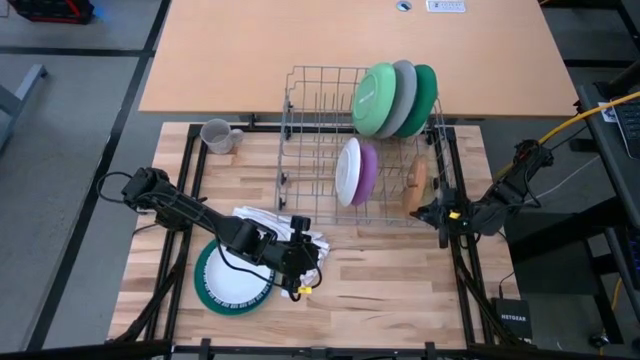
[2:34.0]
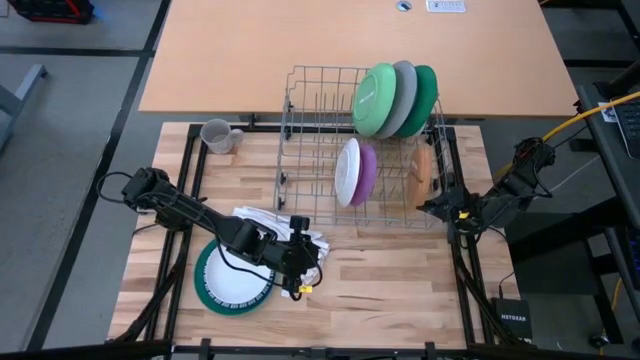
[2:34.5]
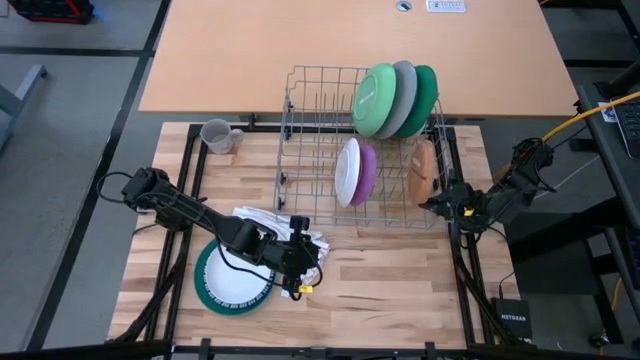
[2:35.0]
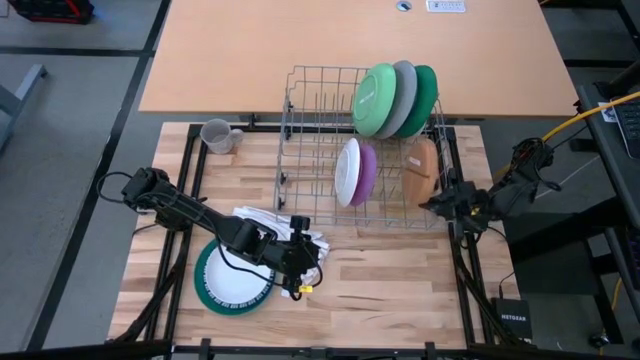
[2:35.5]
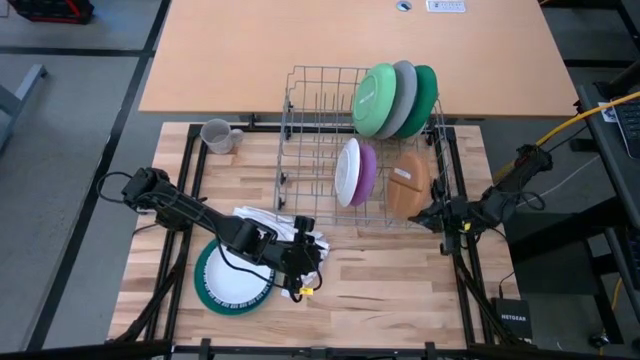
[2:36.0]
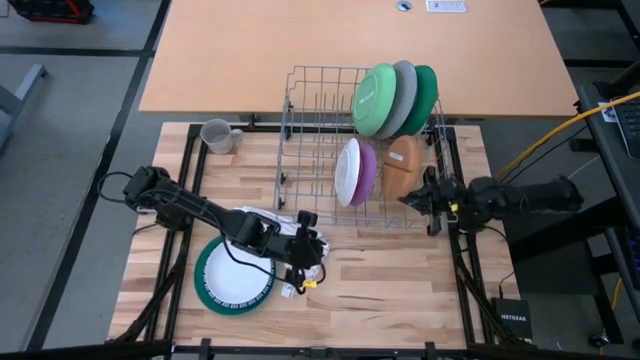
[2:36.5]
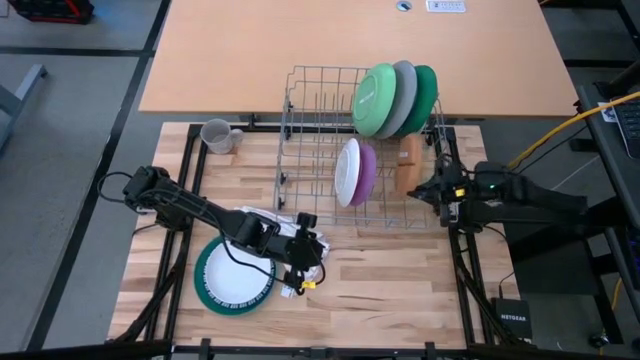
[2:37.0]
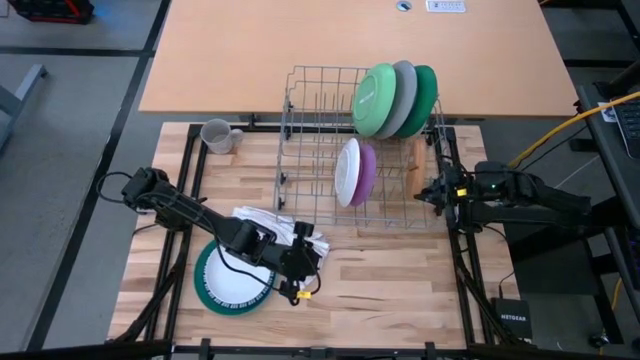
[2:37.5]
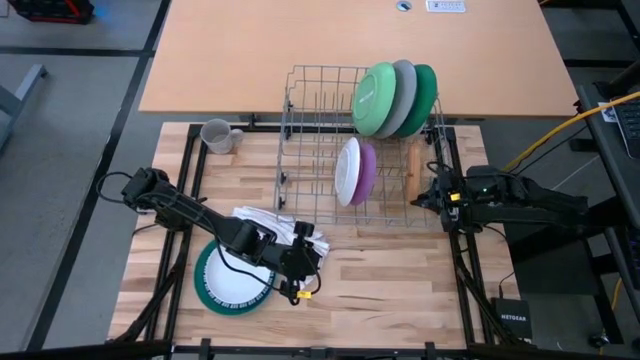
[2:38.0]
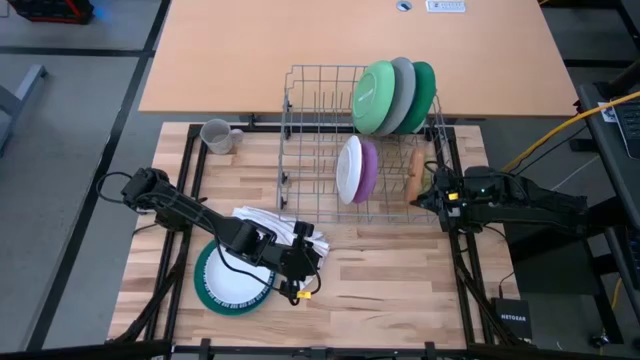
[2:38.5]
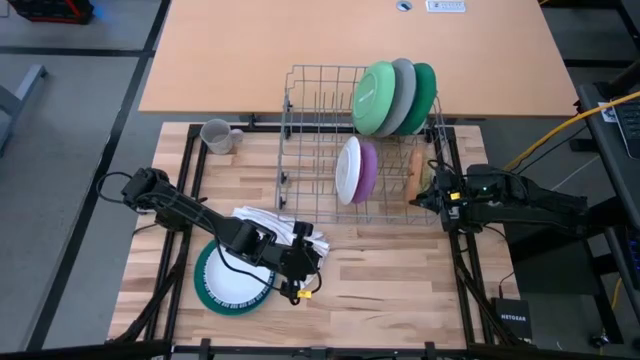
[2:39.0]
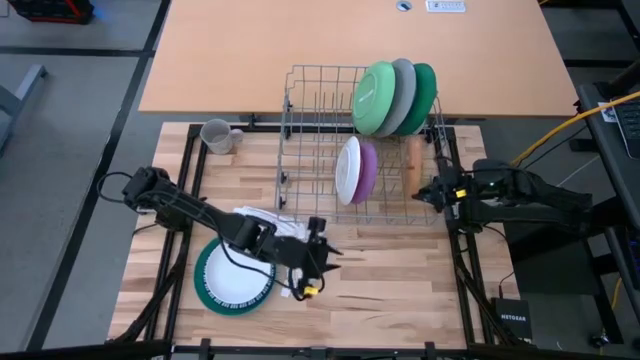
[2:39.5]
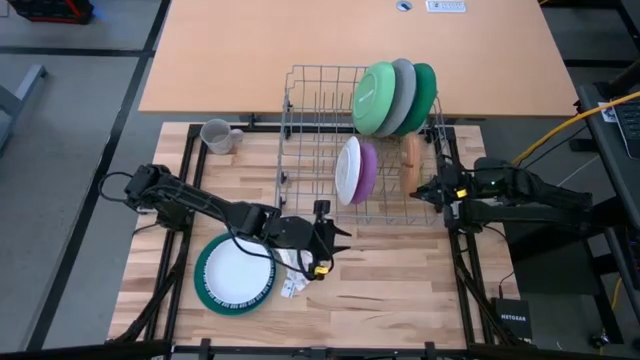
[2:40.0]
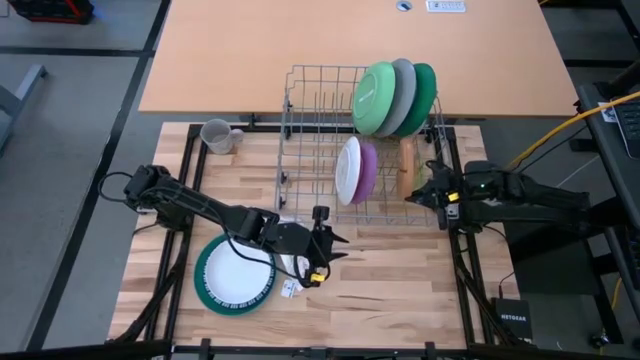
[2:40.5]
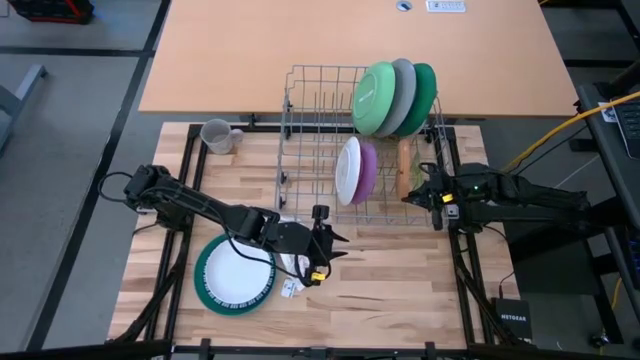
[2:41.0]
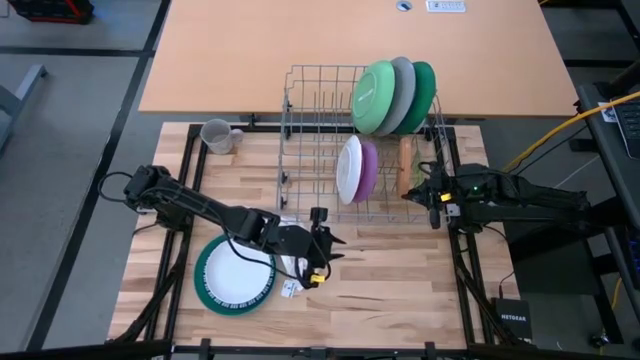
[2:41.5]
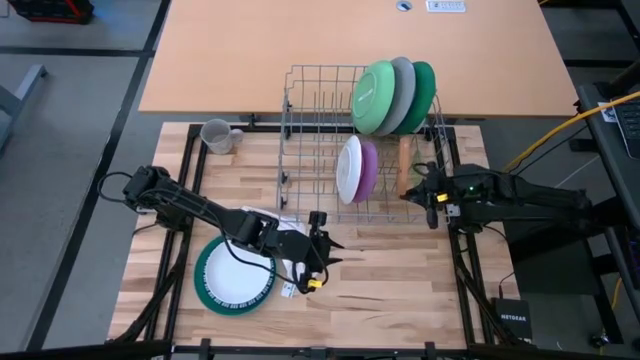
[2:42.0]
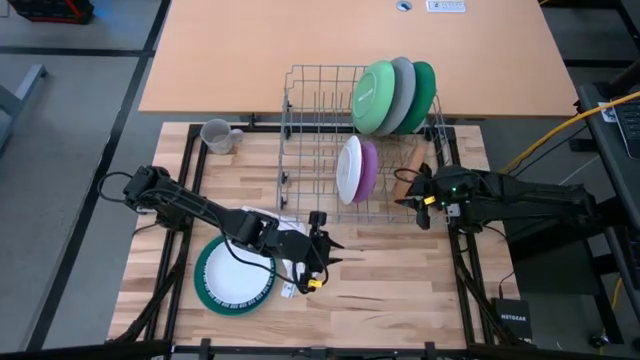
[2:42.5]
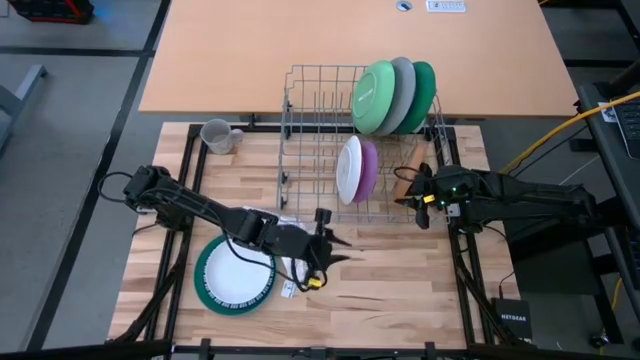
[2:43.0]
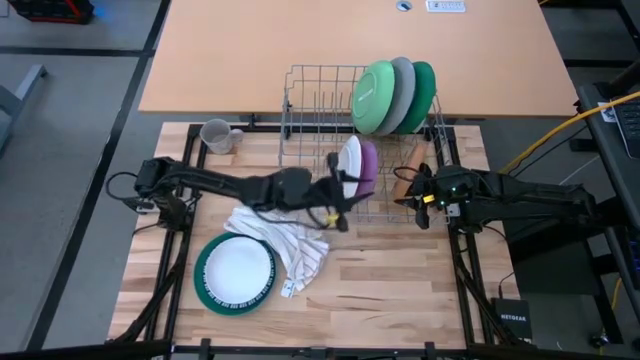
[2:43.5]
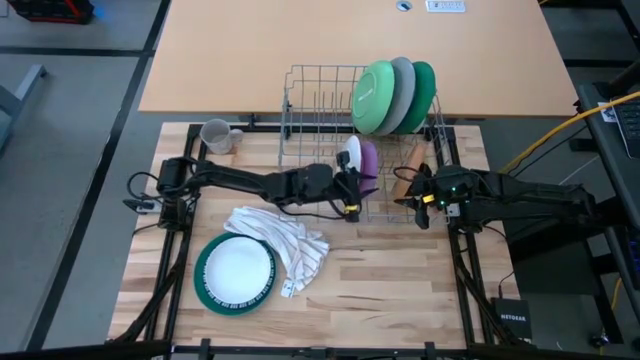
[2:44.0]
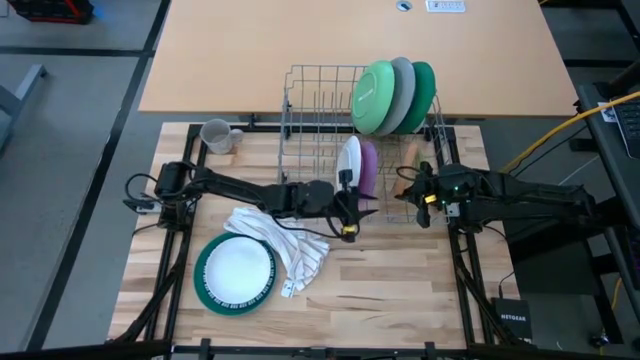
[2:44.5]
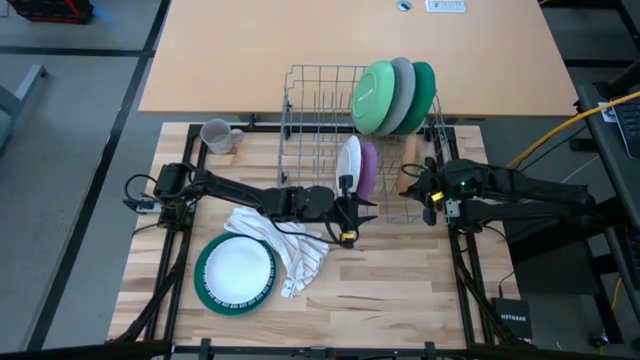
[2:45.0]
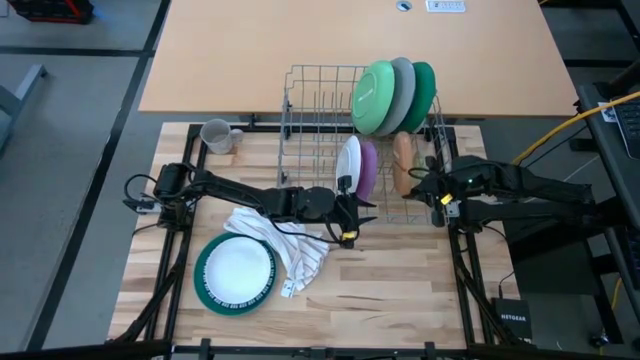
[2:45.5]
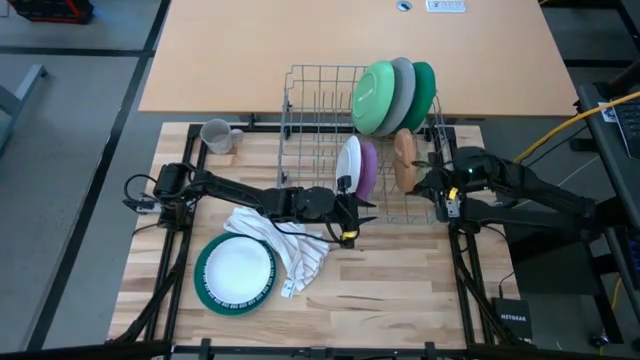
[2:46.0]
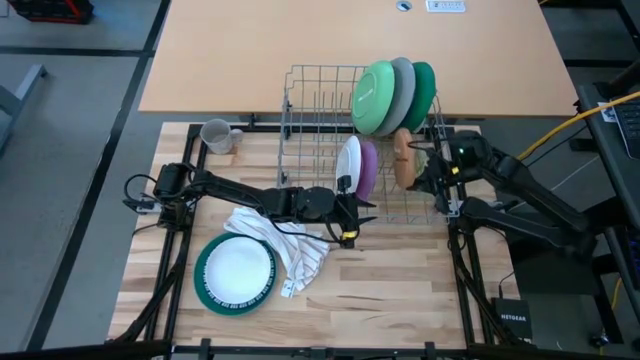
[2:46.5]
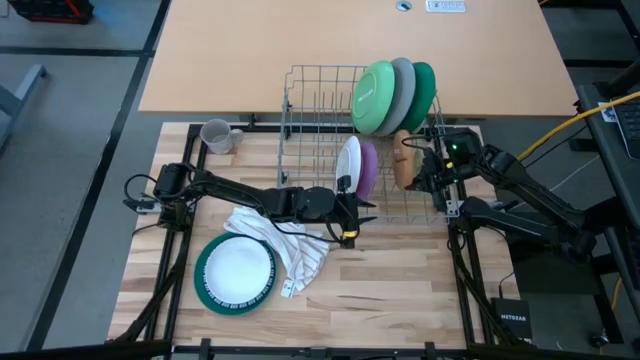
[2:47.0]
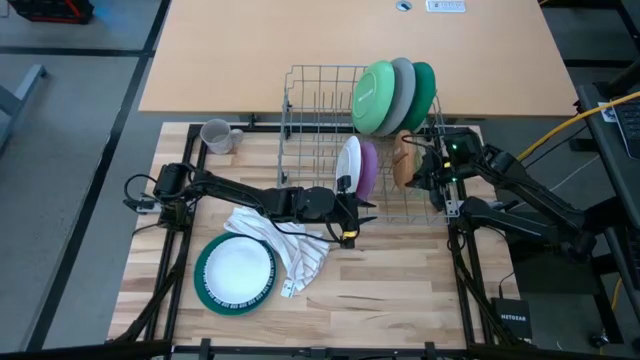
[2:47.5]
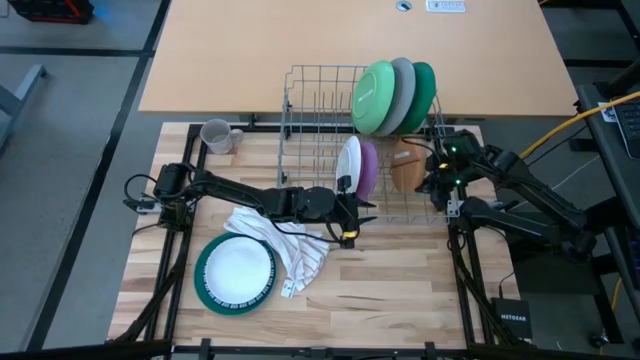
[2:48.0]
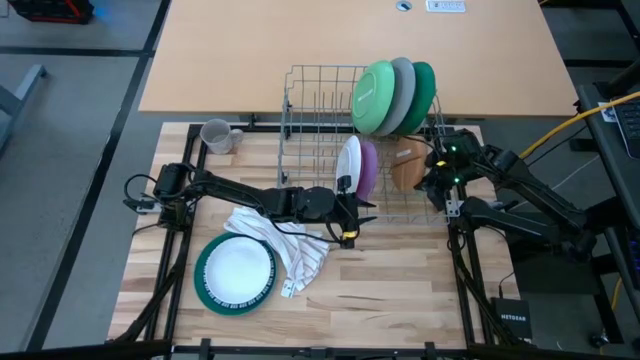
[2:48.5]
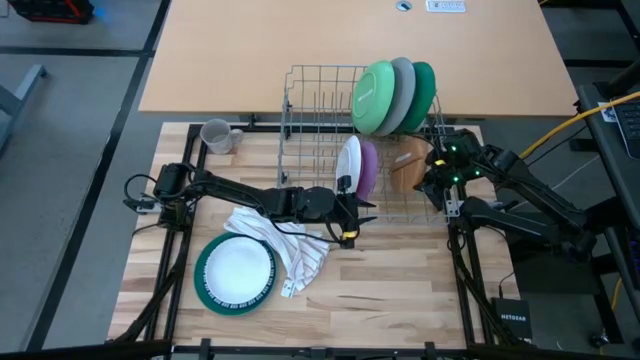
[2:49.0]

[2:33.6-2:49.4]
Task: Sort dishes
Put the brown plate into the dish rack

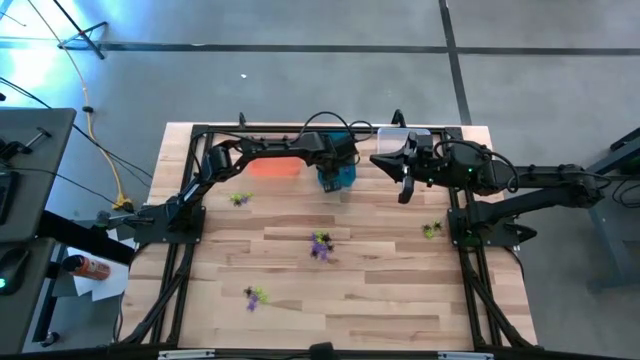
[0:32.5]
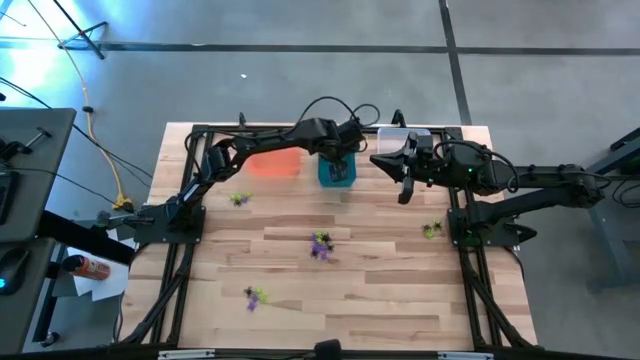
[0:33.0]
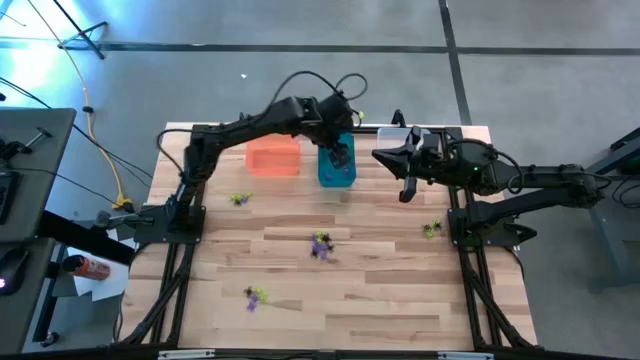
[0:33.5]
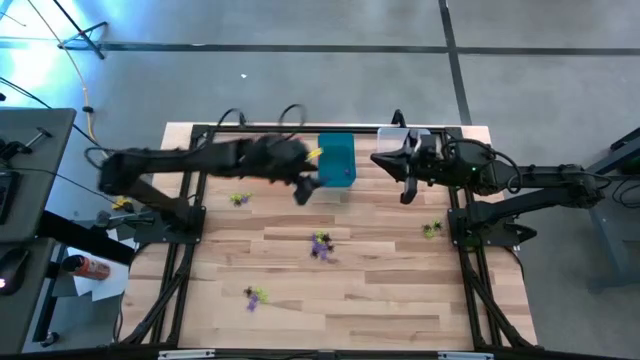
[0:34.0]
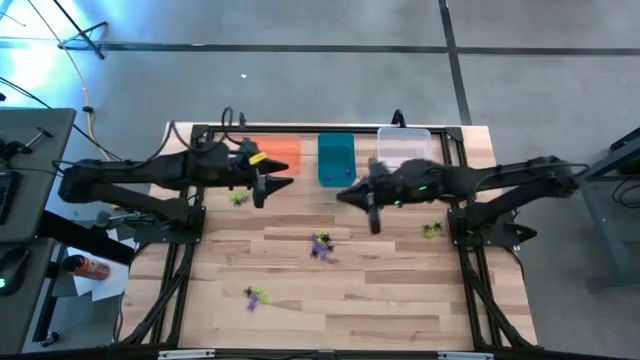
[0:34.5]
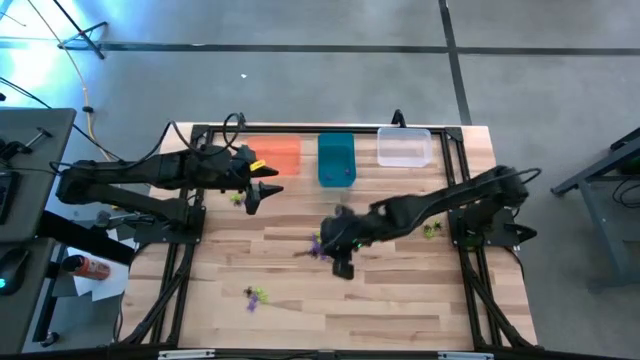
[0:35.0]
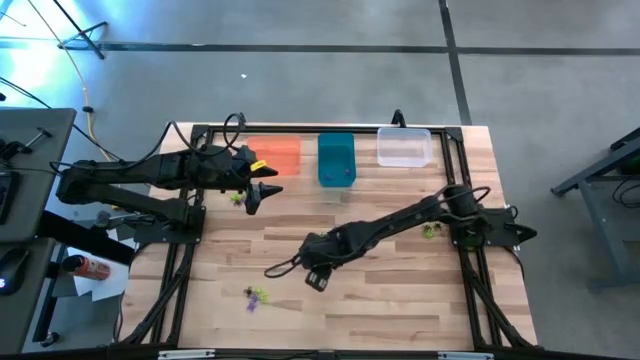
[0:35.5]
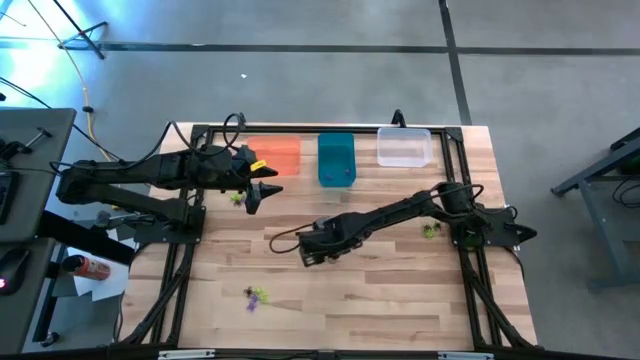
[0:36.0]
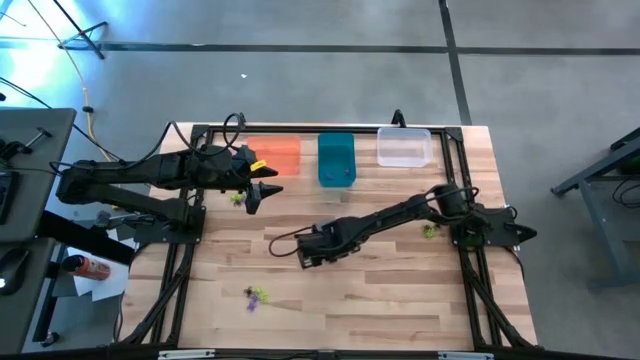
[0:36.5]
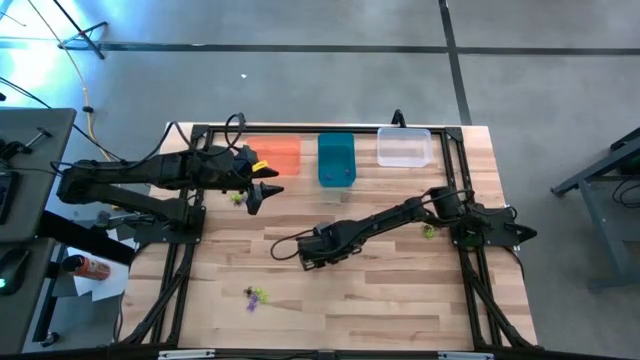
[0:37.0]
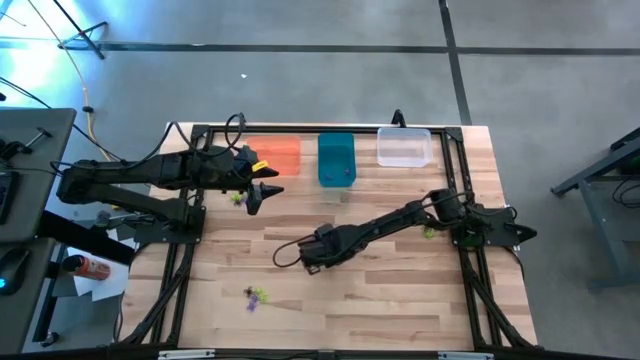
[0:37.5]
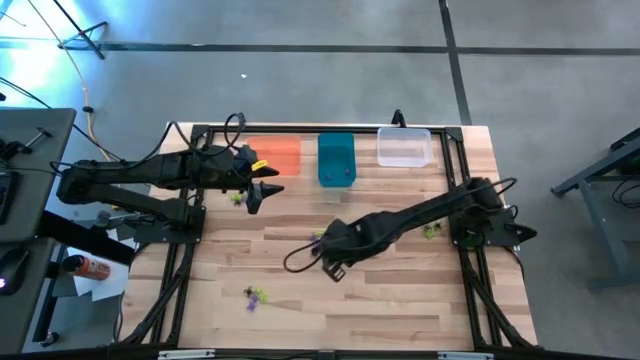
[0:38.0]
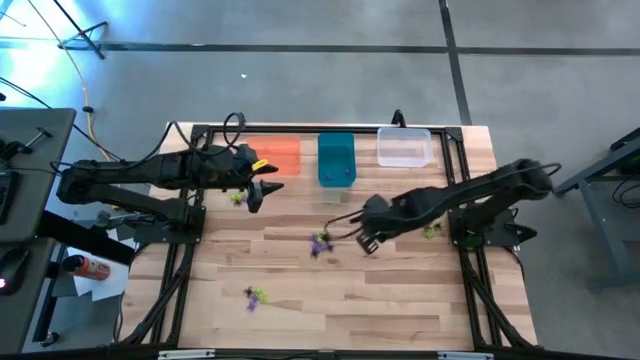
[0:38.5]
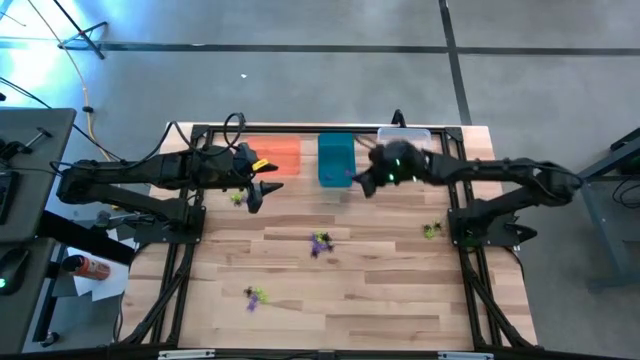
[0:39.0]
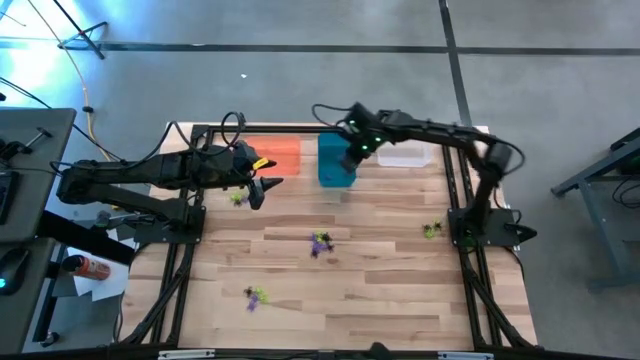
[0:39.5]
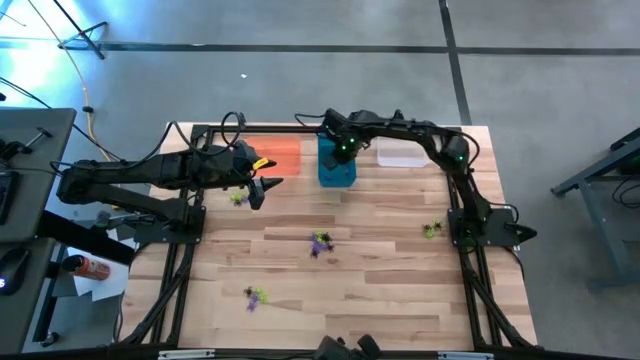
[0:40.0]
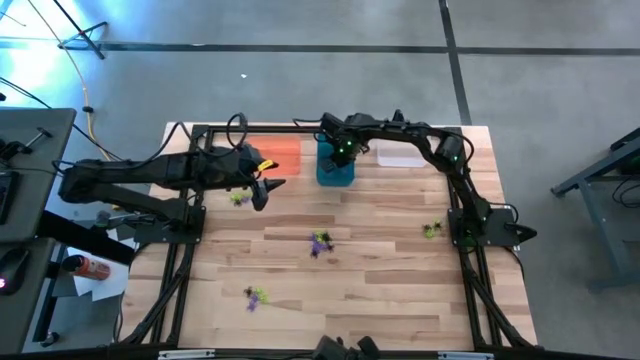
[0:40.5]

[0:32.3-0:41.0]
Task: Sort Halloween decoration
Put the purple spider toy into the blue bin
